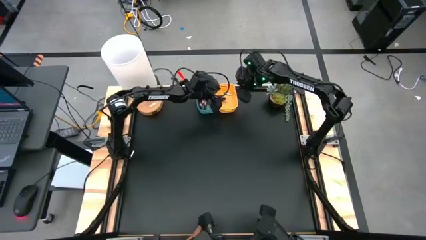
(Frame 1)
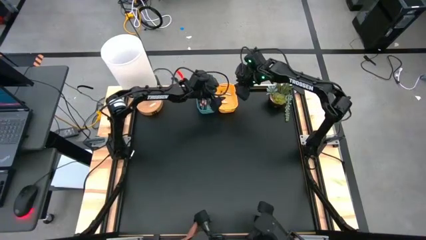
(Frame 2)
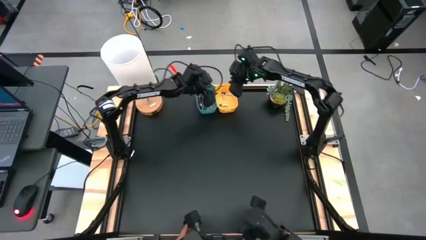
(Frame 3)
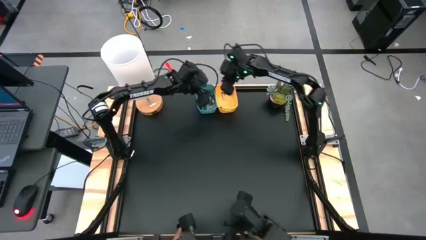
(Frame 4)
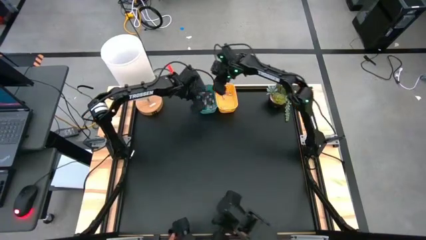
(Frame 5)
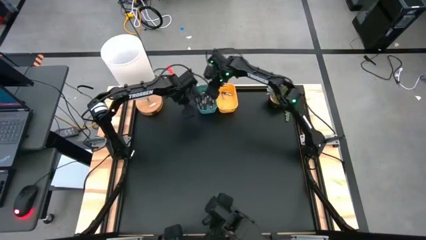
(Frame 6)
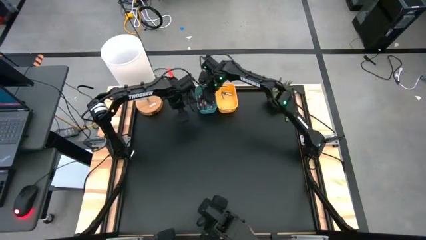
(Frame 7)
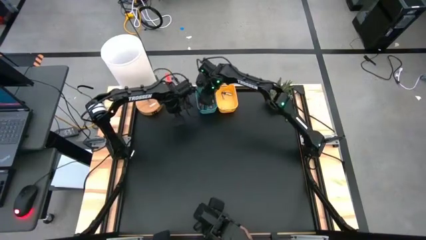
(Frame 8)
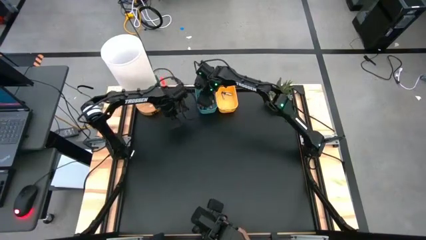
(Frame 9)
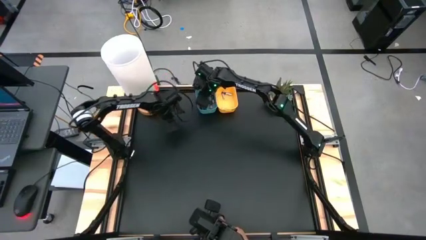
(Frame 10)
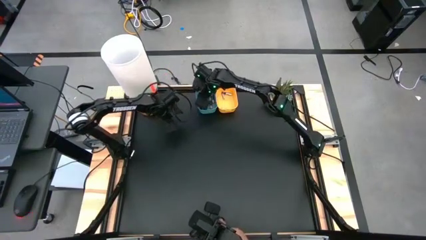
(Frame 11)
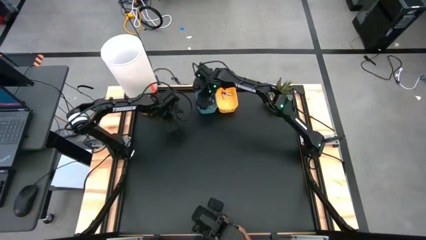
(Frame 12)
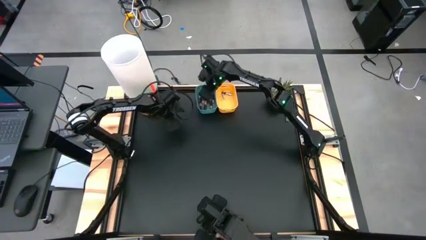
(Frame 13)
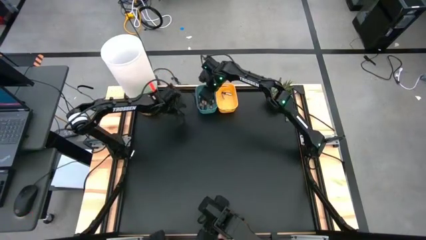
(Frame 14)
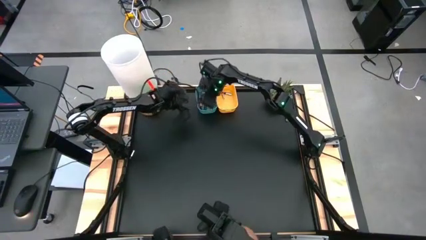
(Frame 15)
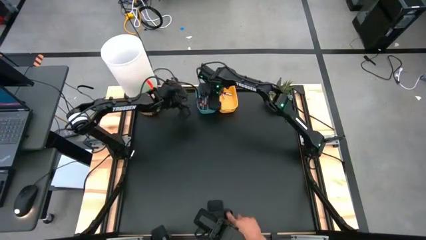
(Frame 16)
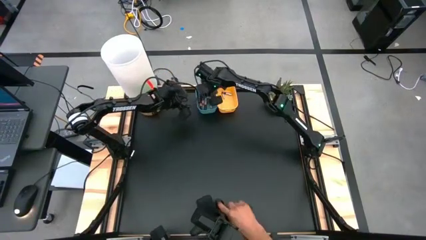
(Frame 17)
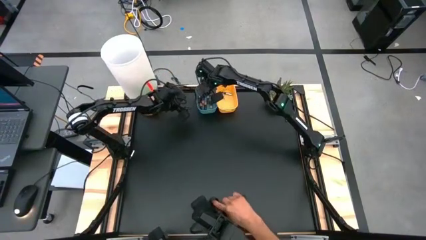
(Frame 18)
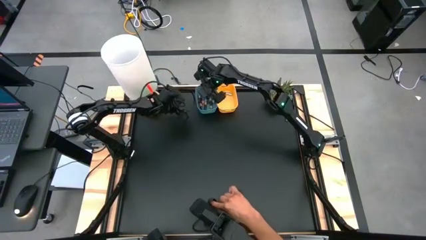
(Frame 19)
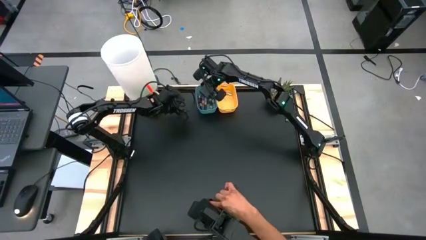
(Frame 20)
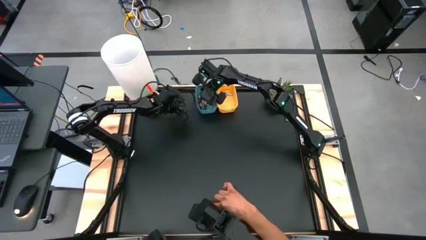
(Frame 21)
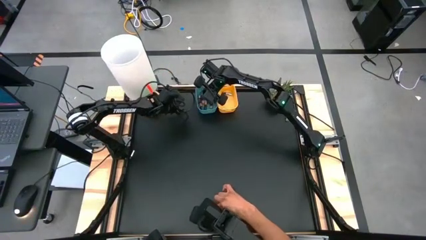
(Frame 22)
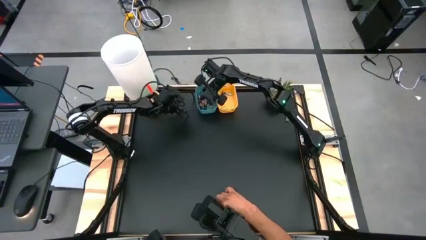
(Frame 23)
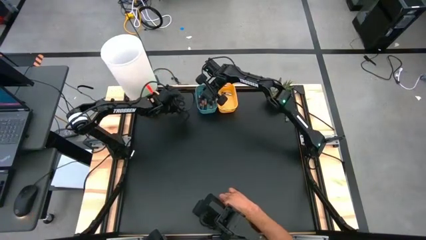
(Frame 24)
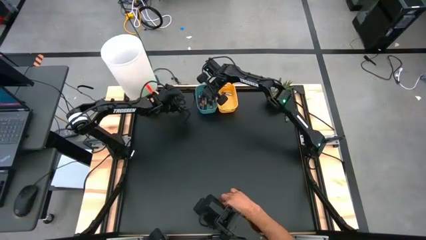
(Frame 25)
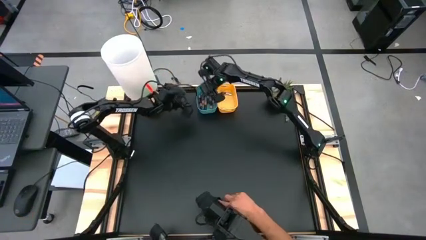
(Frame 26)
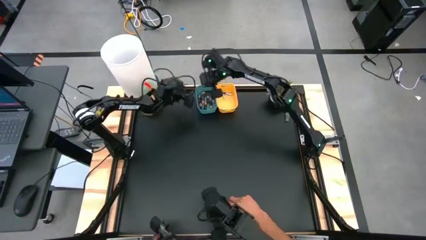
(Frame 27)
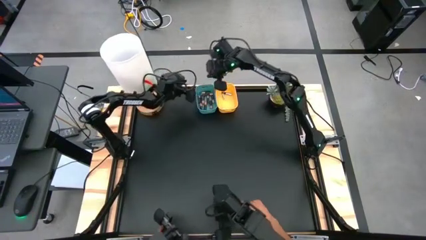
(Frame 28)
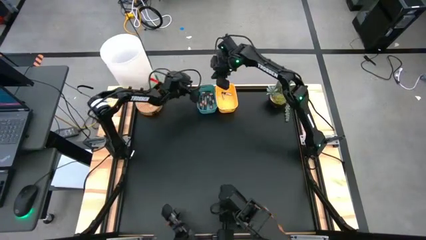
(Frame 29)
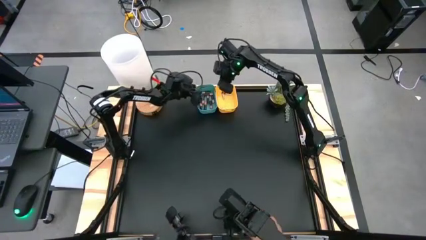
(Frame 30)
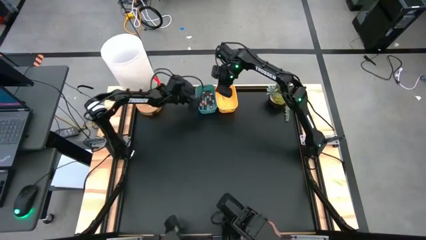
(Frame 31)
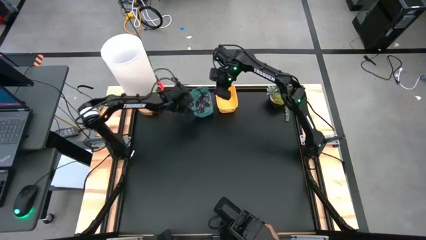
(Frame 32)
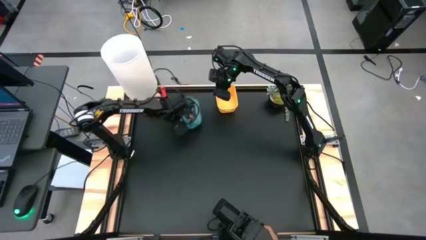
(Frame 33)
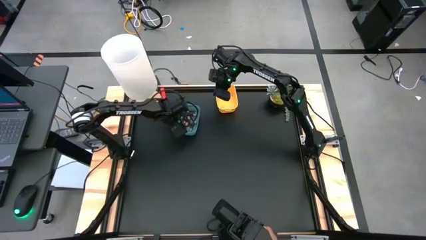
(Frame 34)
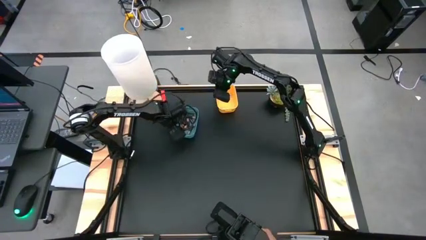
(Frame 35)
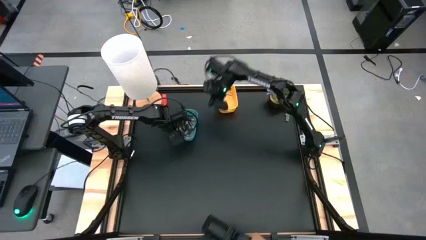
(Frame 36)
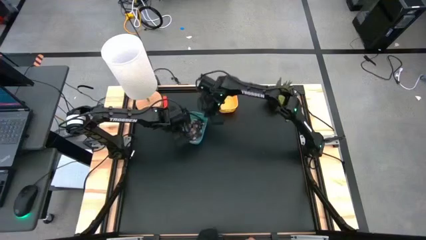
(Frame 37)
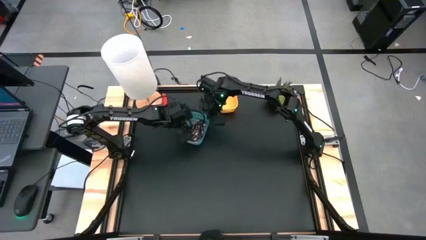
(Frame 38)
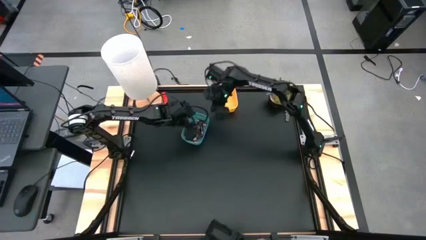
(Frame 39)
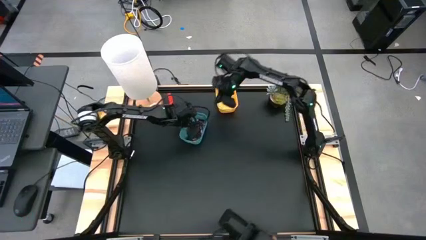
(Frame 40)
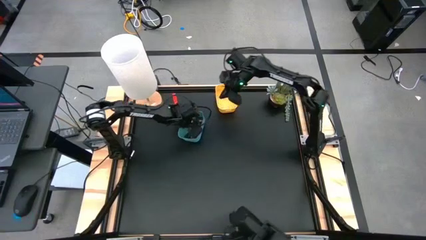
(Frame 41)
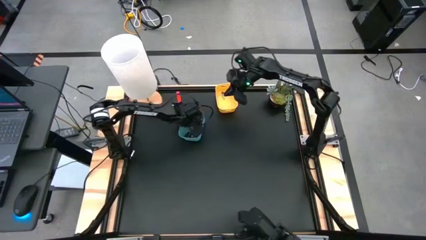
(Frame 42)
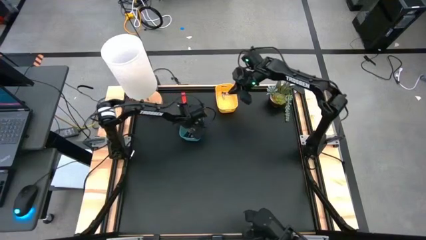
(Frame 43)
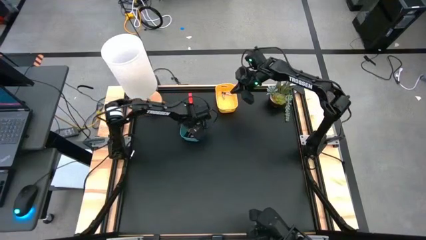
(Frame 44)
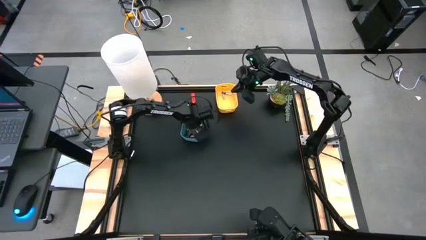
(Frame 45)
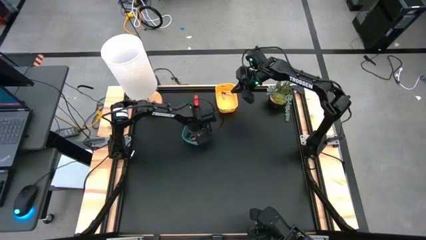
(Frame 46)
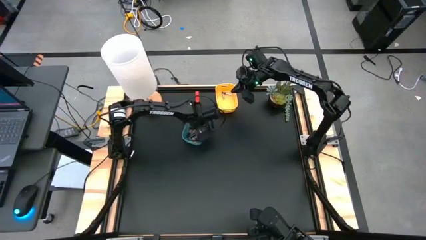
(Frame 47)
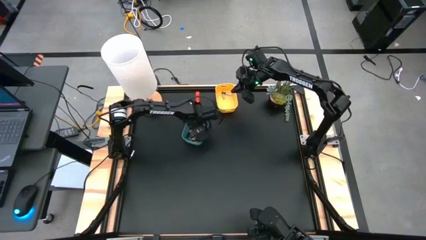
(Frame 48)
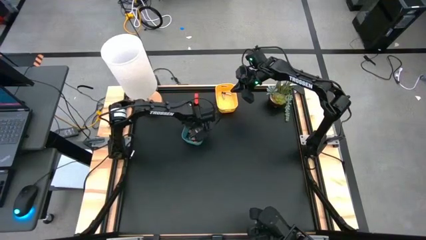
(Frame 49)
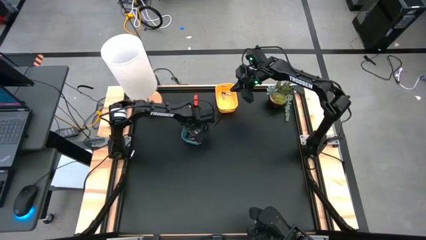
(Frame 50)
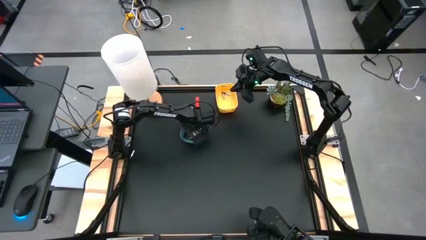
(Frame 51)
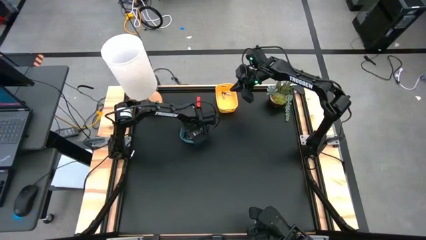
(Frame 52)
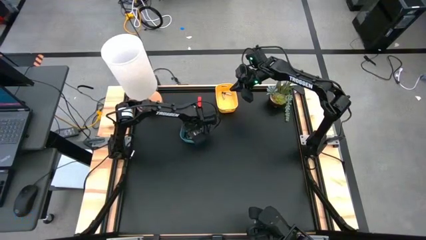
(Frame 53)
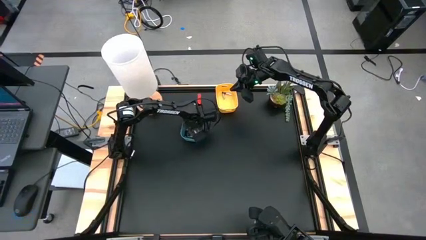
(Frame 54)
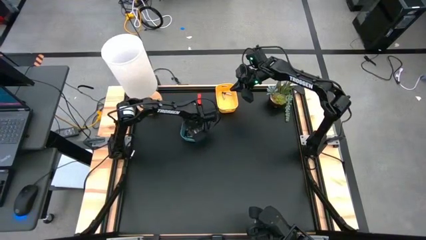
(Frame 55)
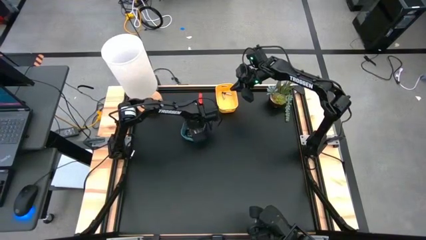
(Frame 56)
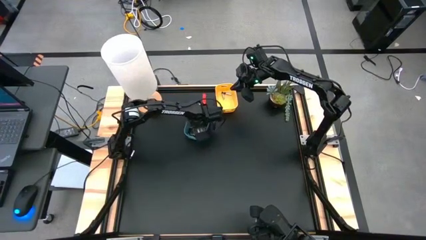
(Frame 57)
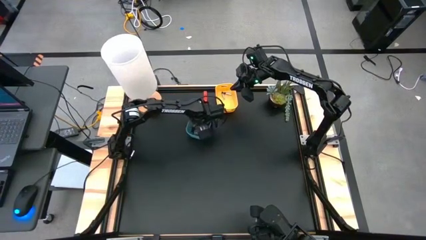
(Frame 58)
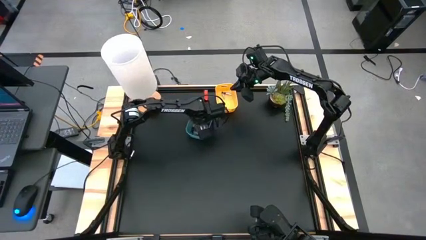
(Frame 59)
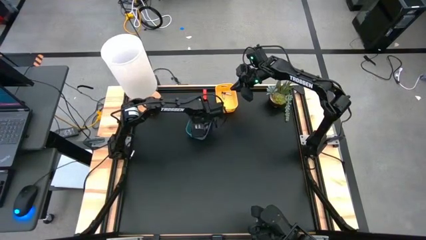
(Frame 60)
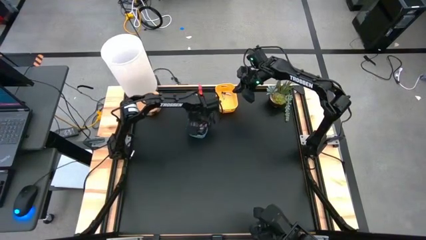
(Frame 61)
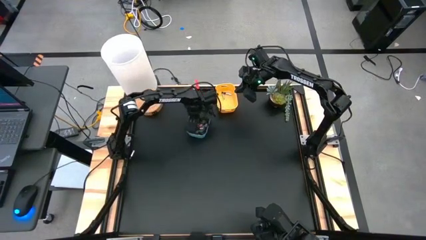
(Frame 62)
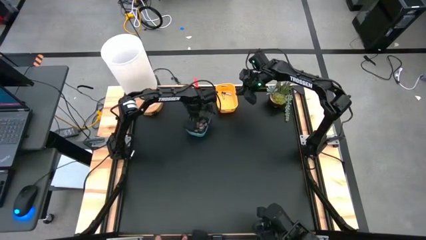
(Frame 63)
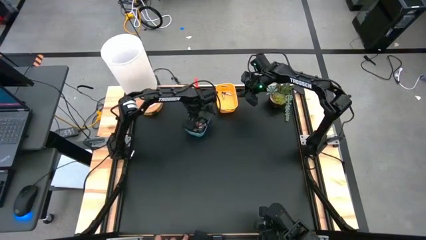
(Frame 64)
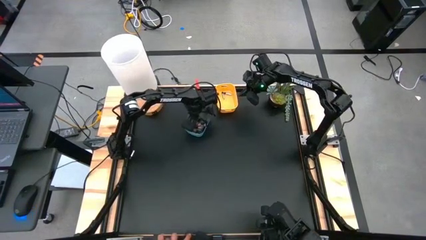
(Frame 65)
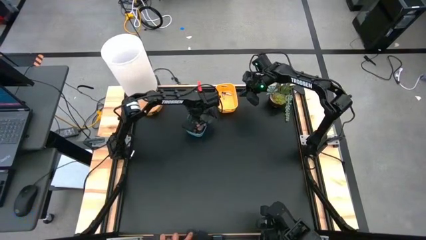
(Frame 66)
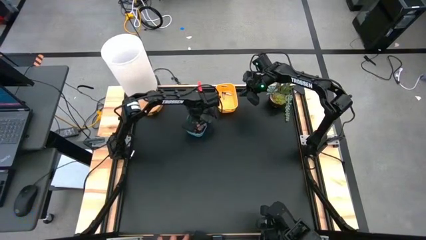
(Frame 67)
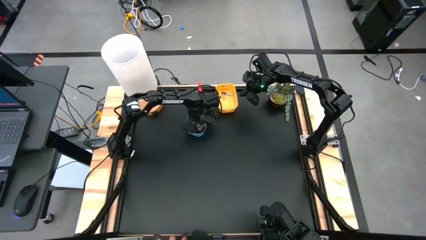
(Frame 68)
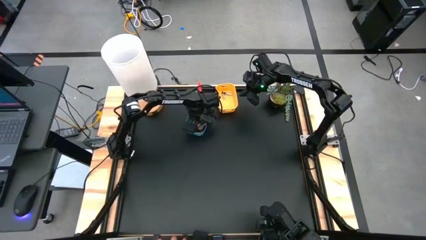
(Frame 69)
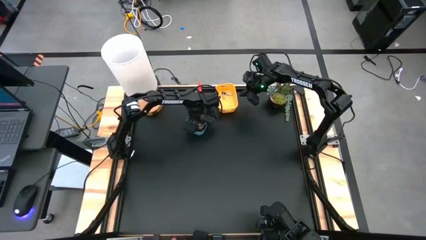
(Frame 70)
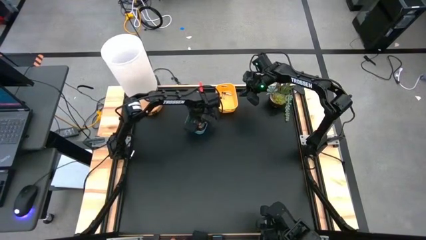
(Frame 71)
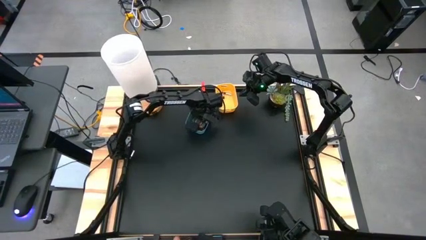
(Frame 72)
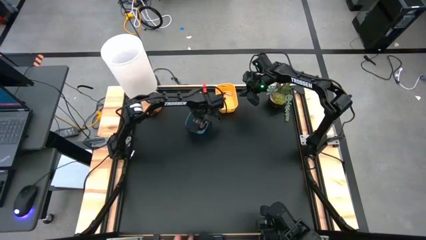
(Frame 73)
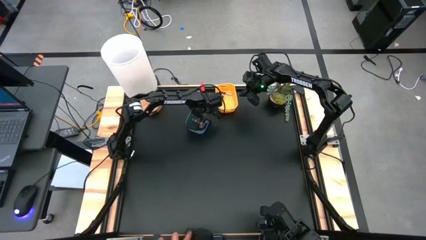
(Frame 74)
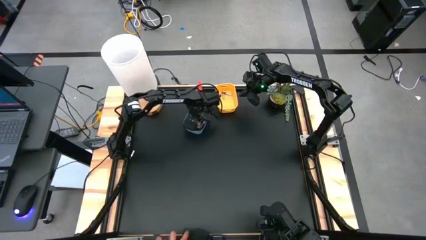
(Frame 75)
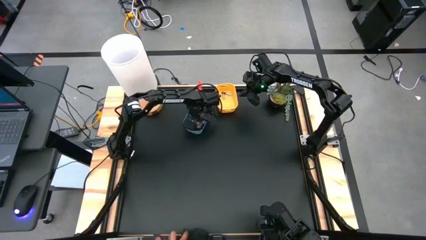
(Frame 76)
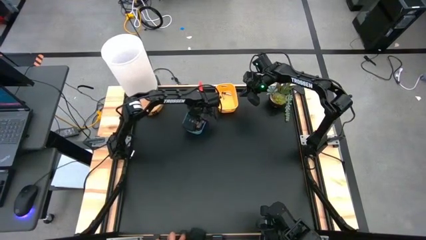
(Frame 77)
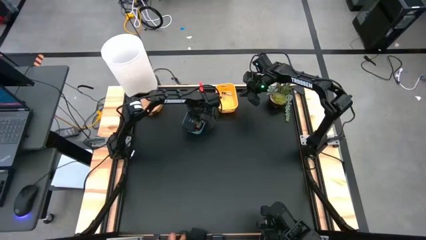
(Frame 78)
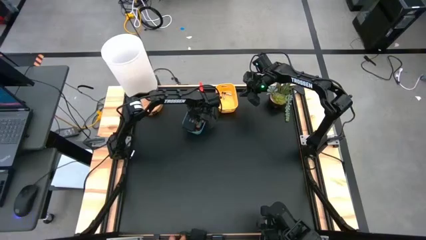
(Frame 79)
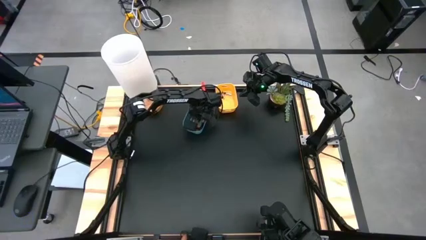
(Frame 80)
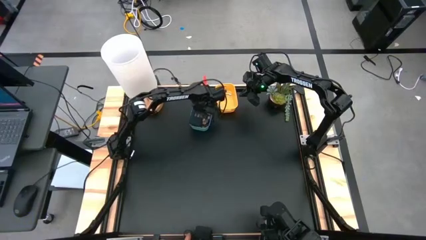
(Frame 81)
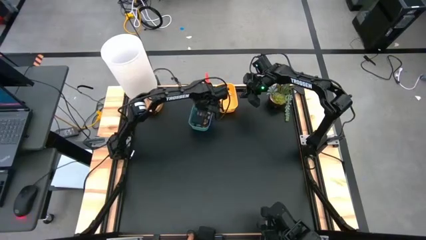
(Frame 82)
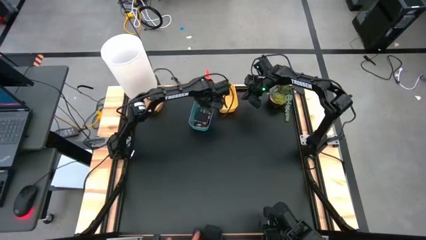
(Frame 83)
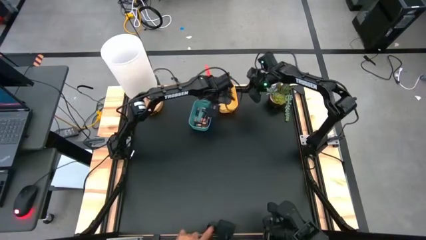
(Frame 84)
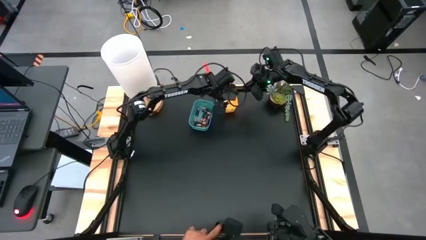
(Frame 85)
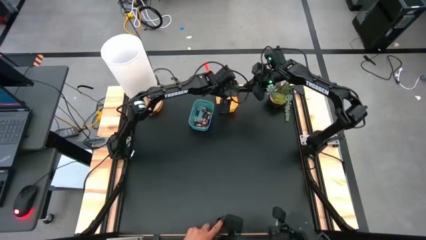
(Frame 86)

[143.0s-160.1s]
Task: Sort batteries
Put the silver black battery into the yellow bin
